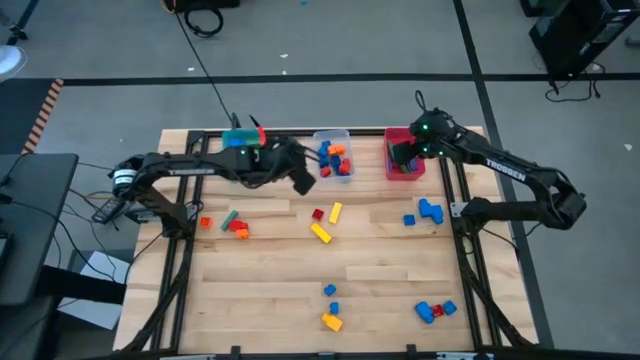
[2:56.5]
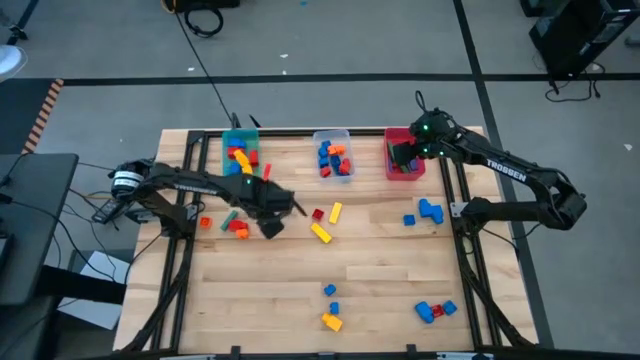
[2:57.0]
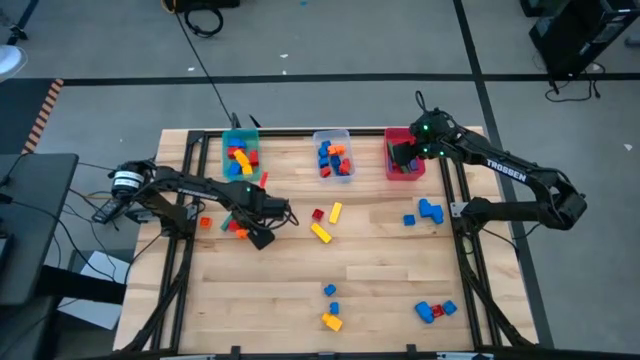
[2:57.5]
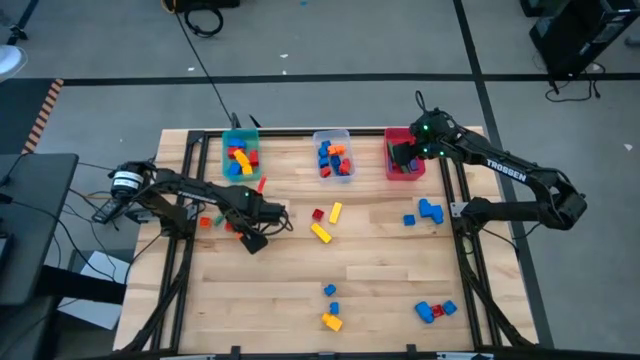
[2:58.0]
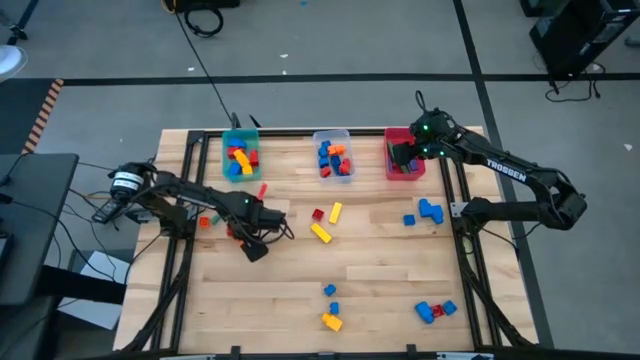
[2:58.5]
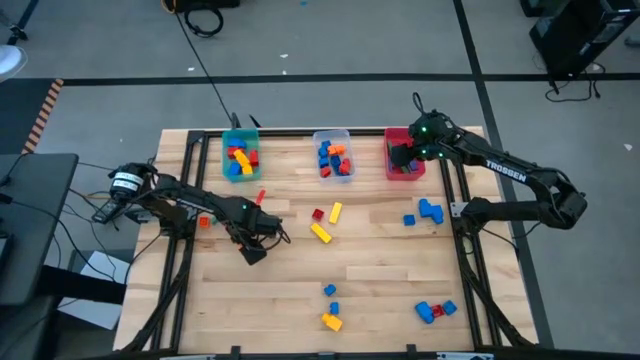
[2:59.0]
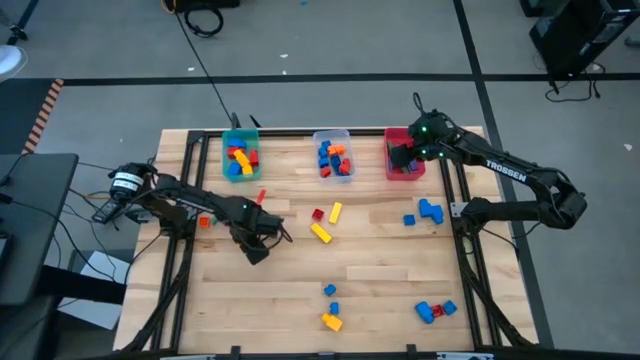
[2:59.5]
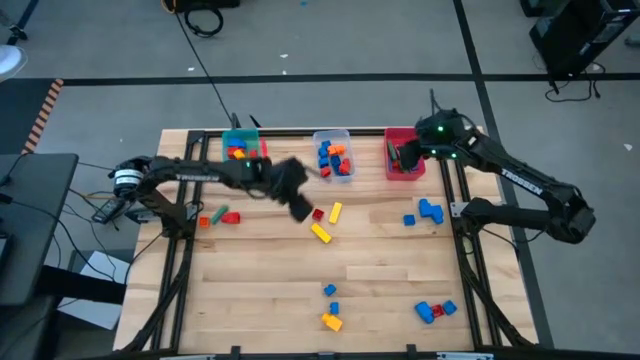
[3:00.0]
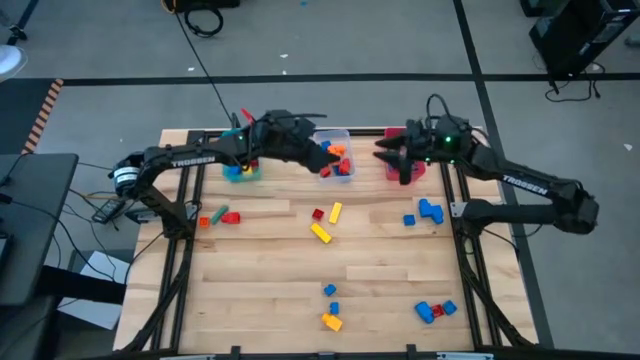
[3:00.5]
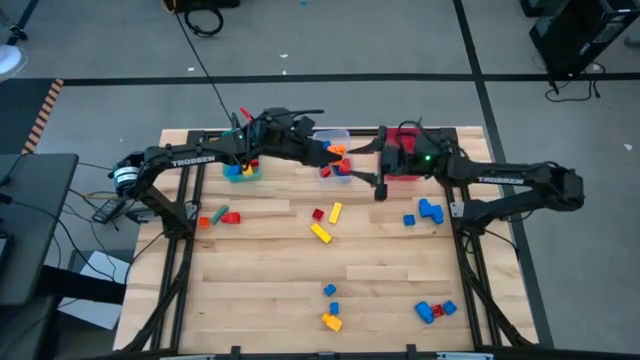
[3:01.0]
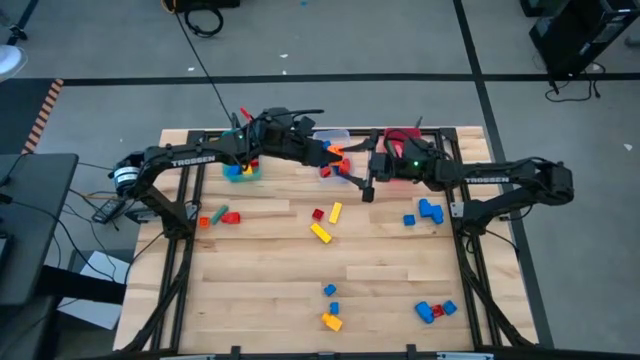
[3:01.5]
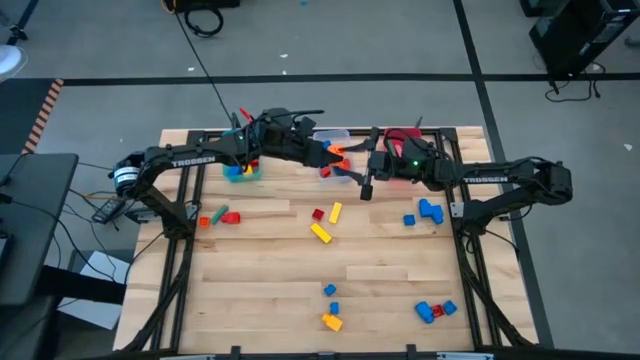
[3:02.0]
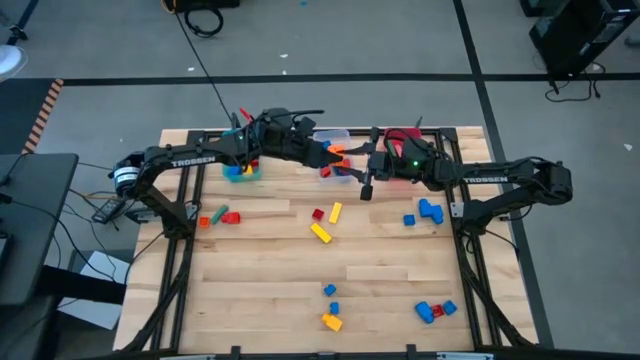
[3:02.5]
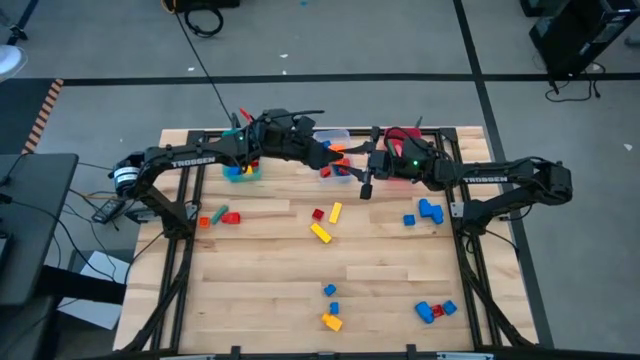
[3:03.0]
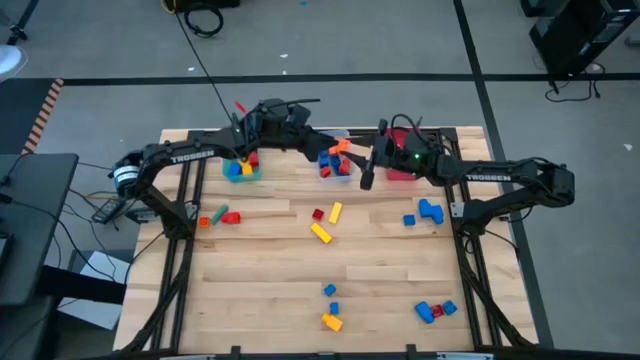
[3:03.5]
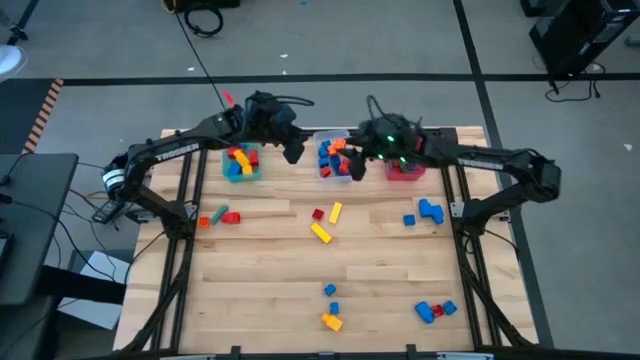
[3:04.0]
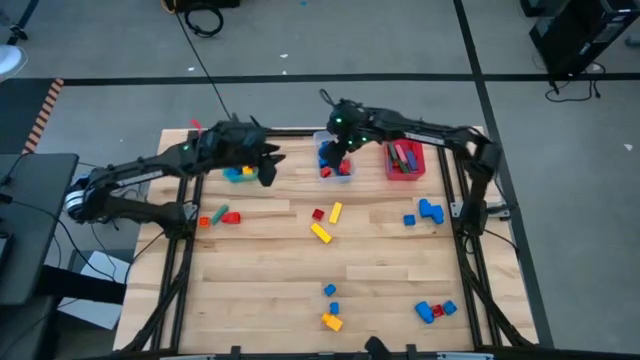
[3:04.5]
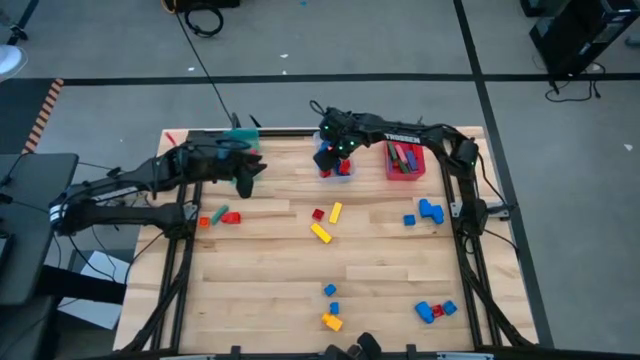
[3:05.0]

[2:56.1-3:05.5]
Task: Sort blocks by size
Put the orange 4 stud game piece into the transparent bin

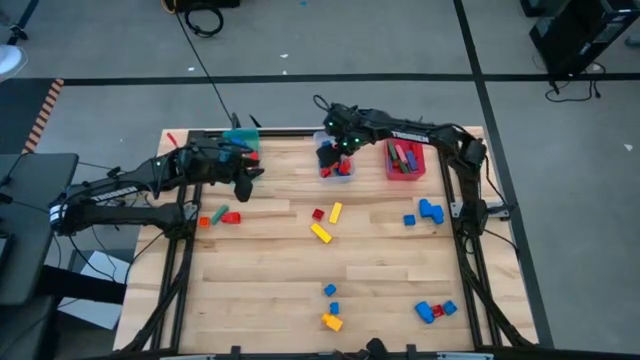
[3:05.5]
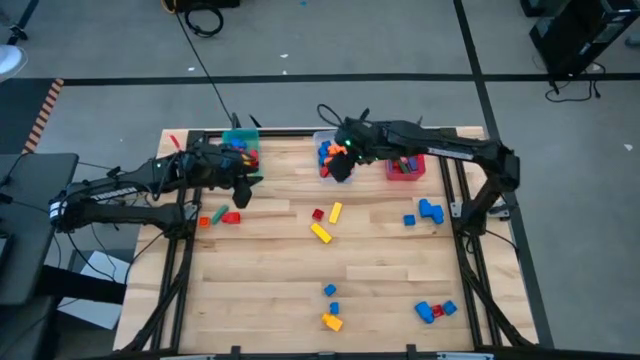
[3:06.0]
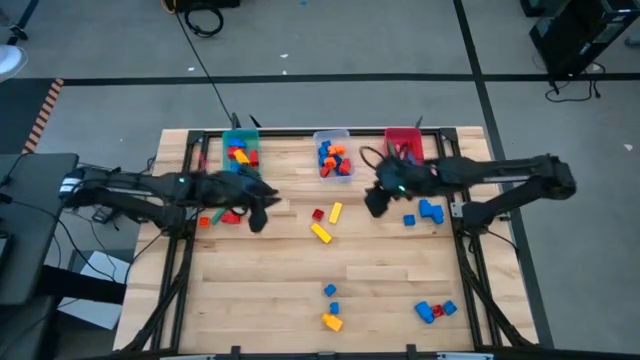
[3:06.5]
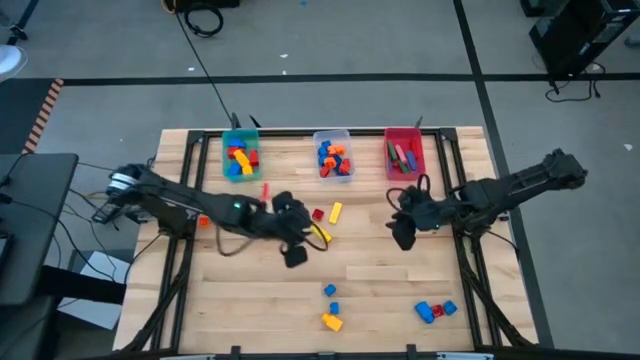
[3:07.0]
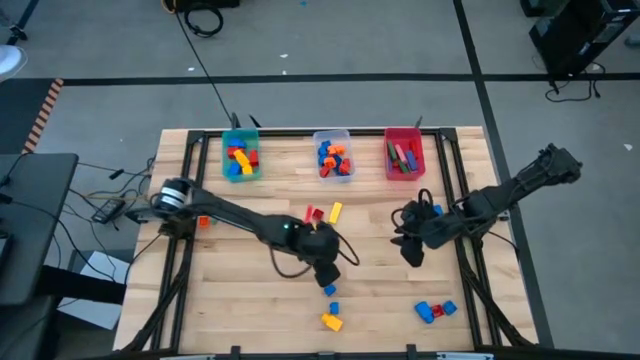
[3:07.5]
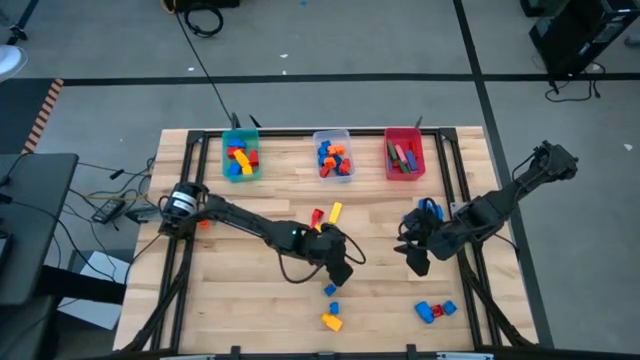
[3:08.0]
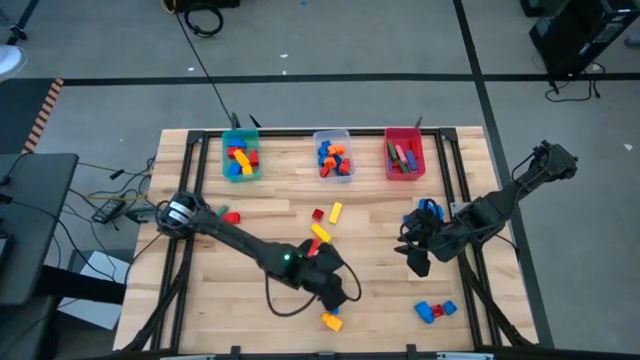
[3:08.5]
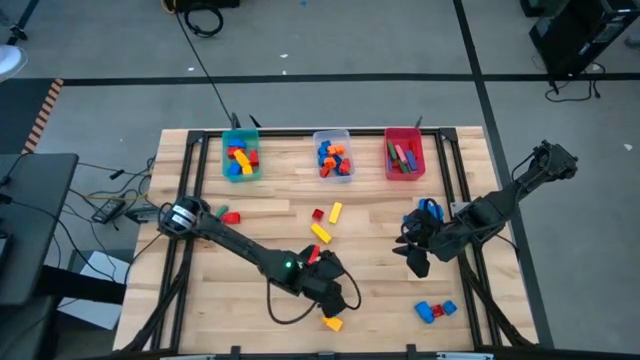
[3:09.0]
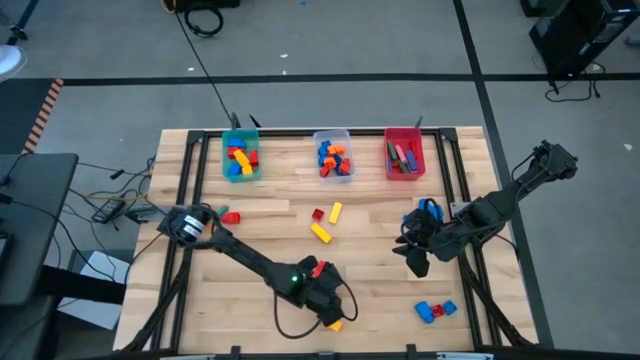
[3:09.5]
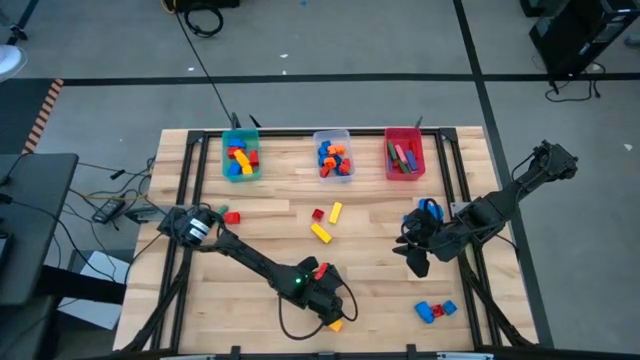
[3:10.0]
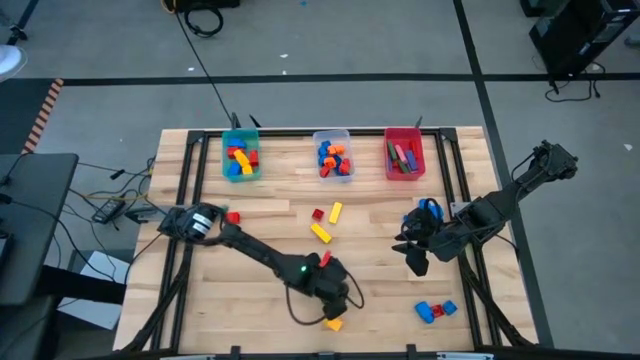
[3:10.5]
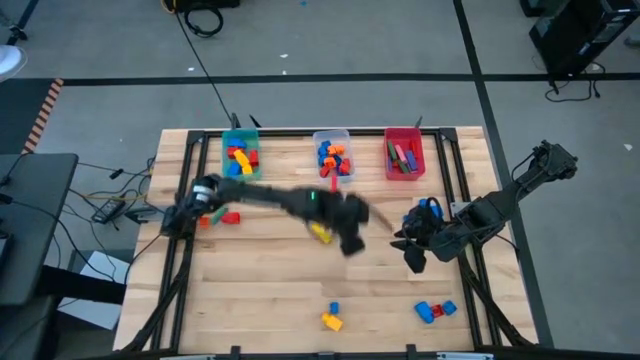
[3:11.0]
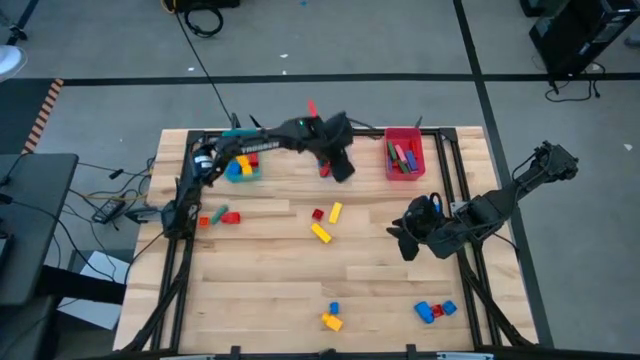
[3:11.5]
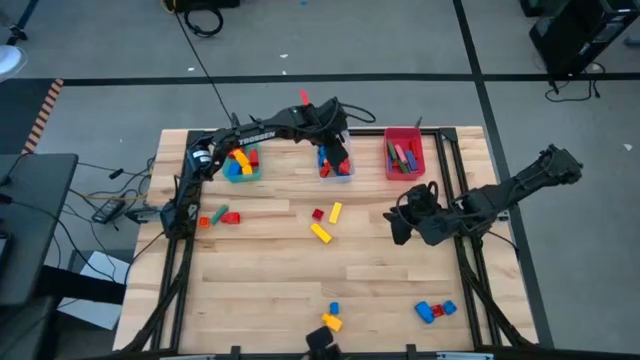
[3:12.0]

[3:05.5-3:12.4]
Put the blue 4 stud game piece into the transparent bin

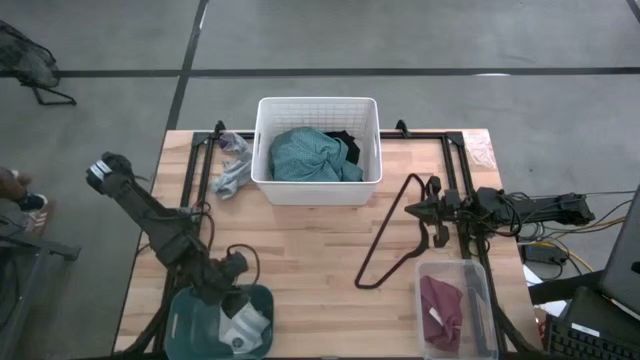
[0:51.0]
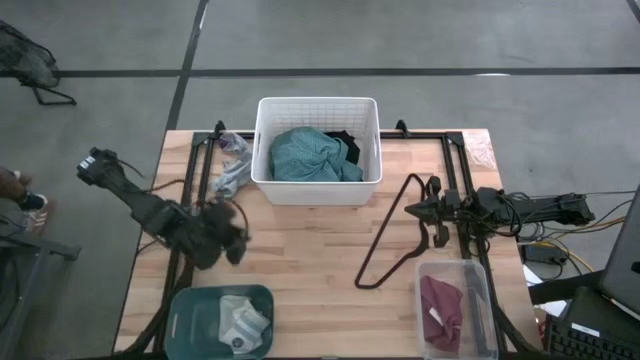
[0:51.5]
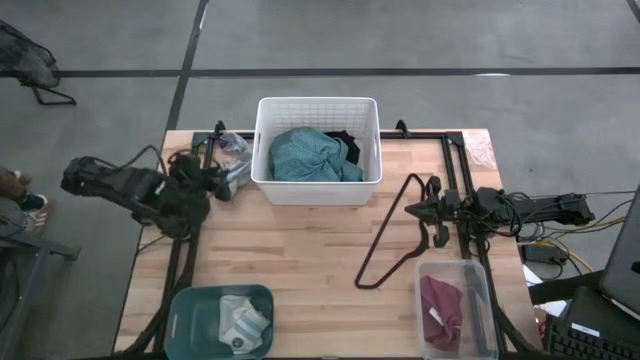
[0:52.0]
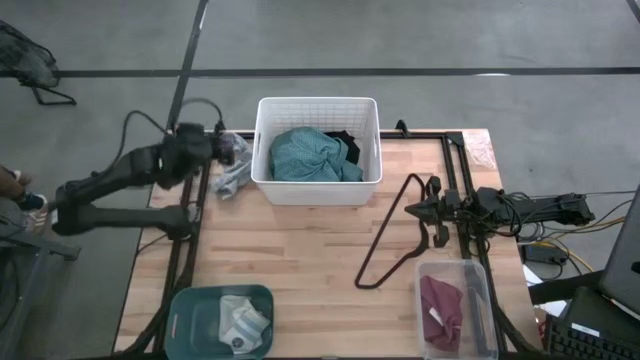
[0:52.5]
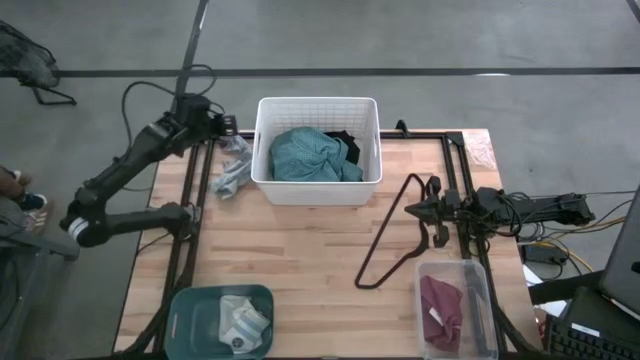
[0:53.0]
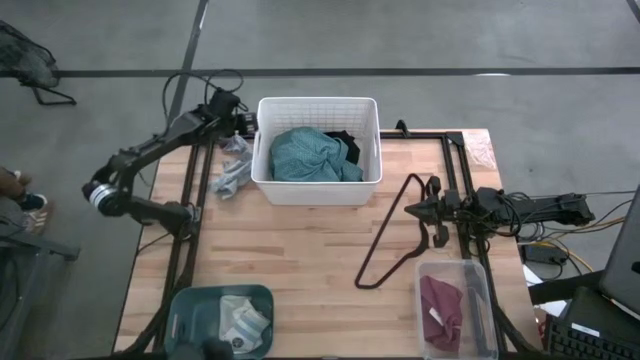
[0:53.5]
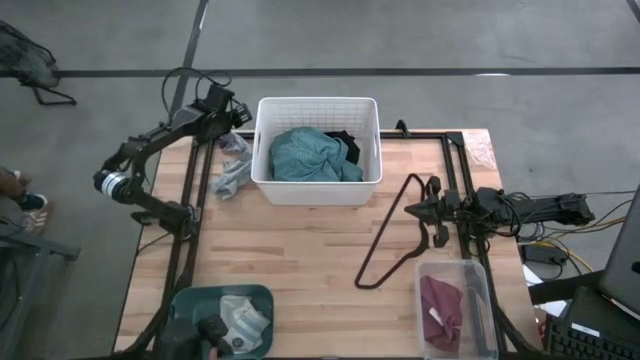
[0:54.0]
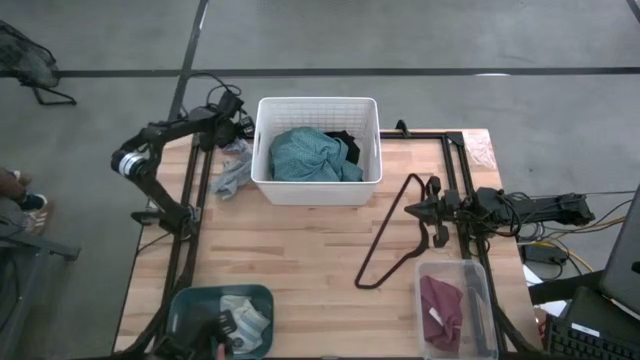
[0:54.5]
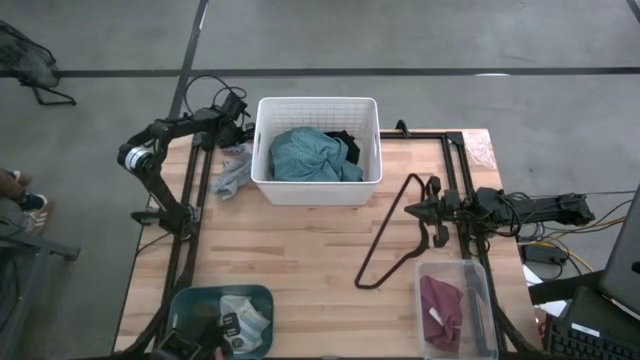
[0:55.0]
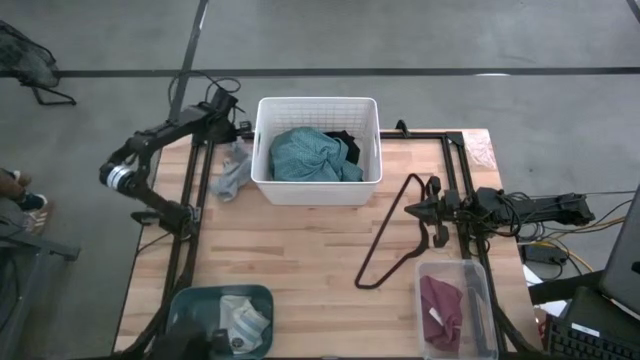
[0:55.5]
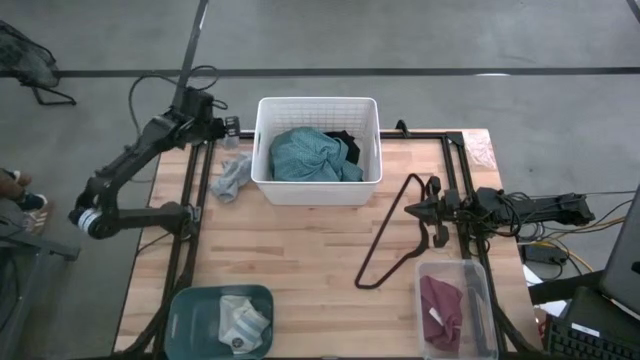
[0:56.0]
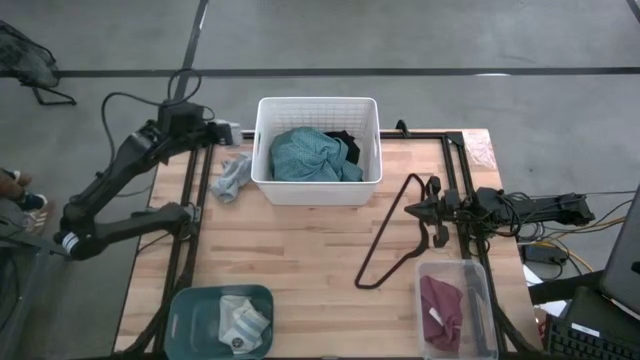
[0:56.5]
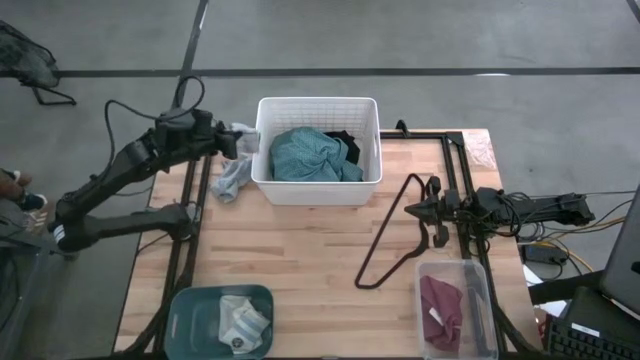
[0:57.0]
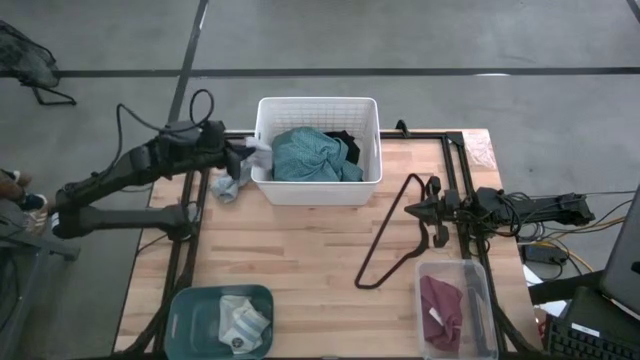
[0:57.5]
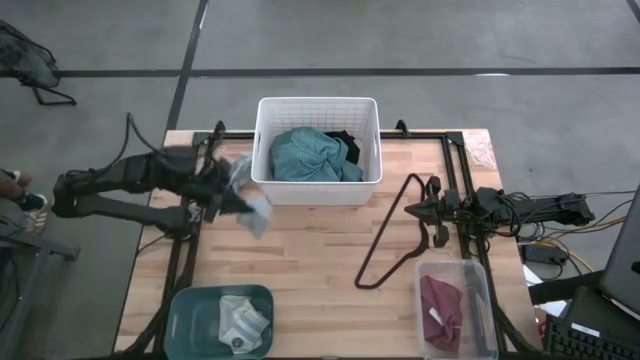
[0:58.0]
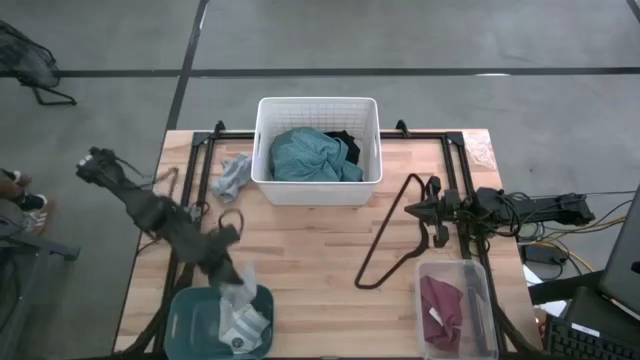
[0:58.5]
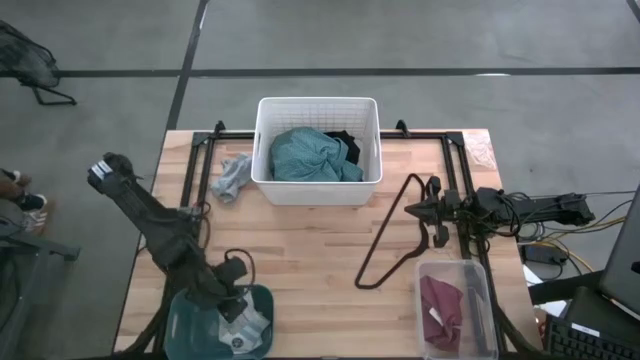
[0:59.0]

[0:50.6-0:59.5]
Task: Pick & Place Cloths
Put the gray sock into the green bin
